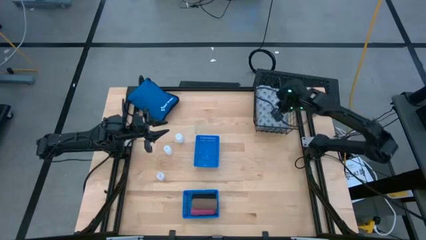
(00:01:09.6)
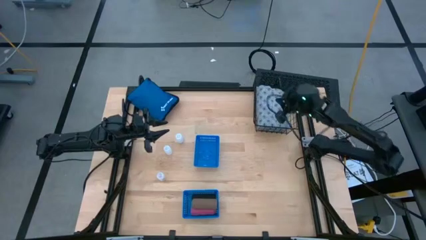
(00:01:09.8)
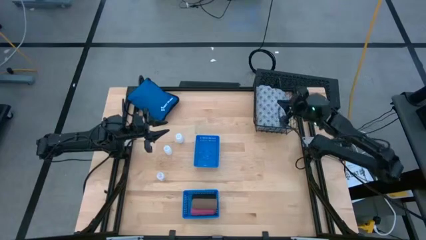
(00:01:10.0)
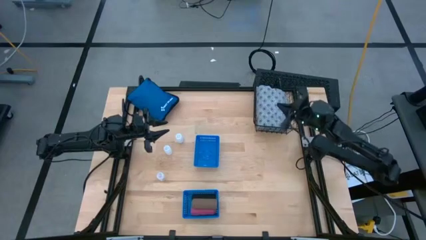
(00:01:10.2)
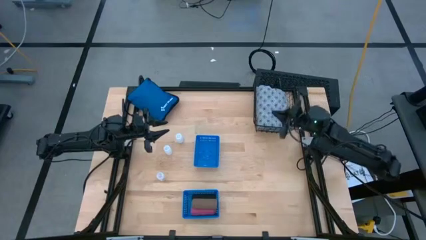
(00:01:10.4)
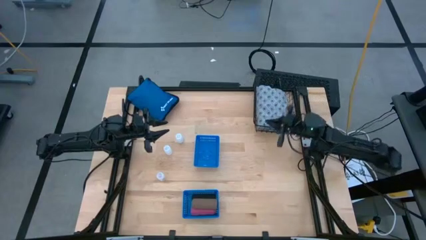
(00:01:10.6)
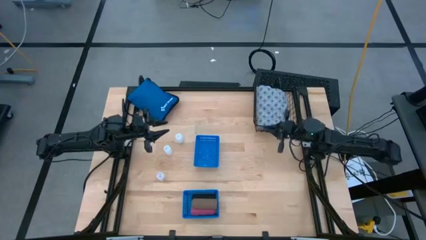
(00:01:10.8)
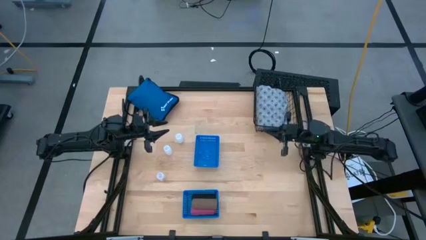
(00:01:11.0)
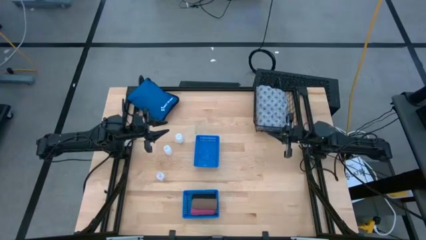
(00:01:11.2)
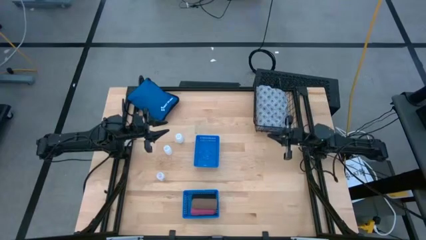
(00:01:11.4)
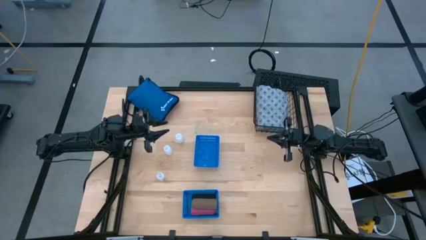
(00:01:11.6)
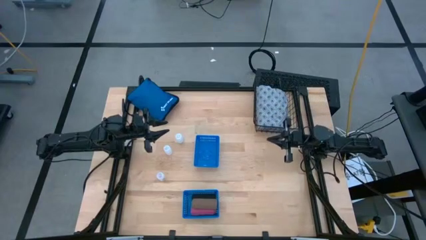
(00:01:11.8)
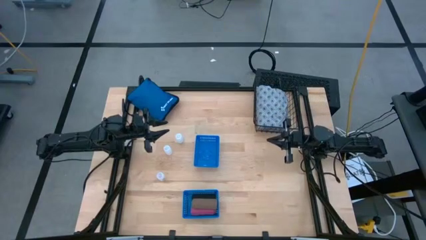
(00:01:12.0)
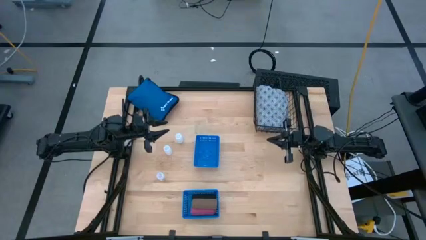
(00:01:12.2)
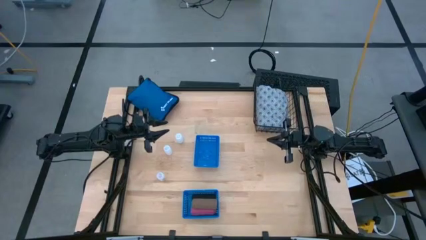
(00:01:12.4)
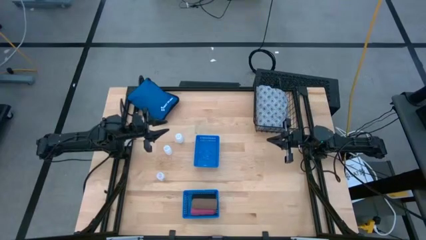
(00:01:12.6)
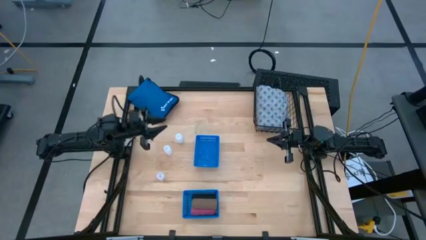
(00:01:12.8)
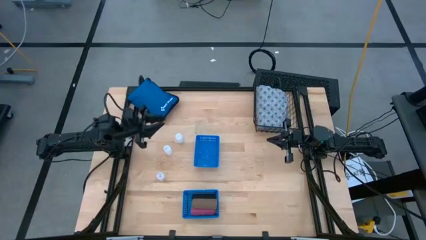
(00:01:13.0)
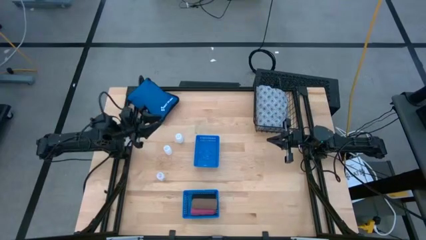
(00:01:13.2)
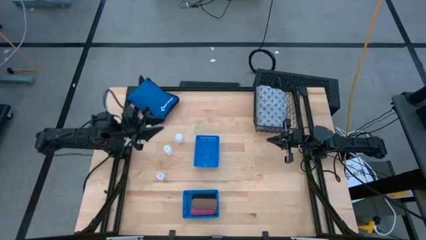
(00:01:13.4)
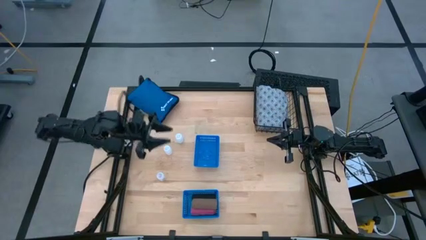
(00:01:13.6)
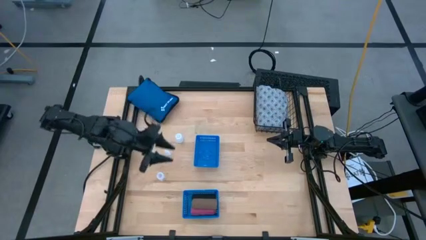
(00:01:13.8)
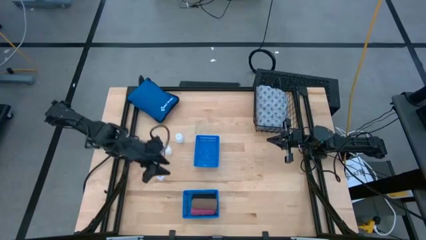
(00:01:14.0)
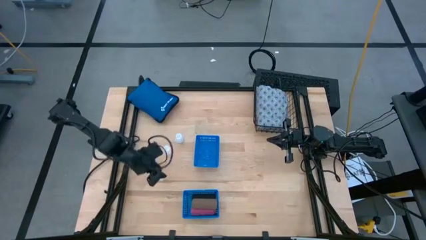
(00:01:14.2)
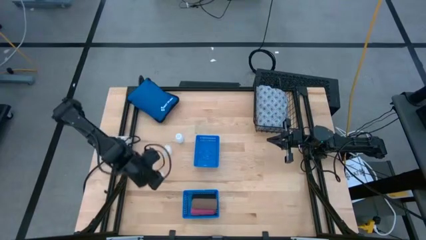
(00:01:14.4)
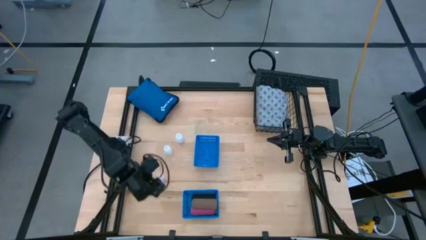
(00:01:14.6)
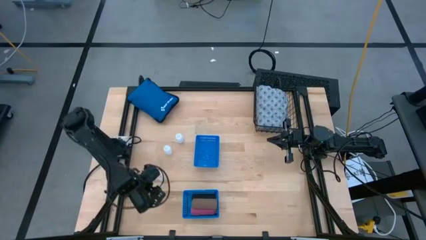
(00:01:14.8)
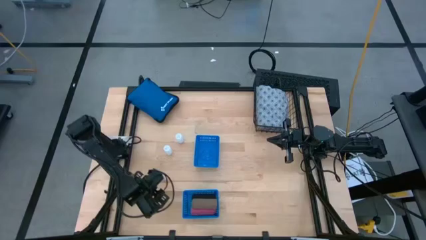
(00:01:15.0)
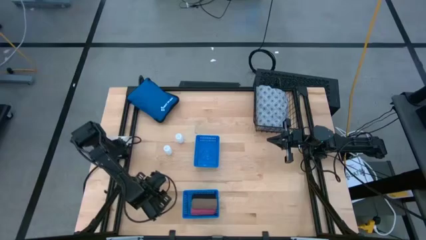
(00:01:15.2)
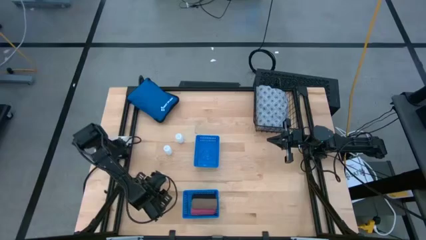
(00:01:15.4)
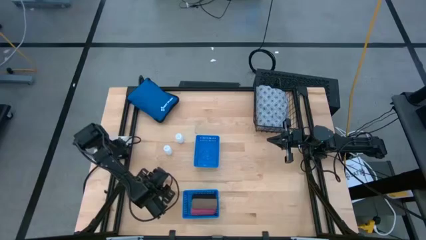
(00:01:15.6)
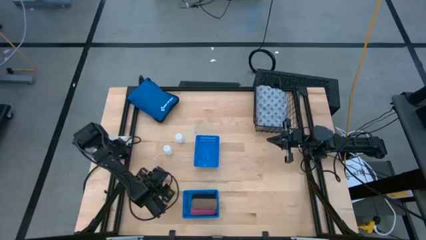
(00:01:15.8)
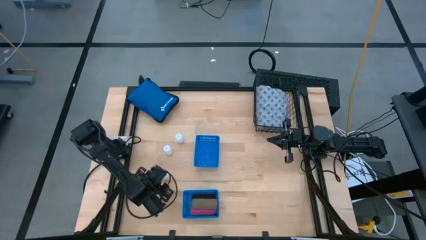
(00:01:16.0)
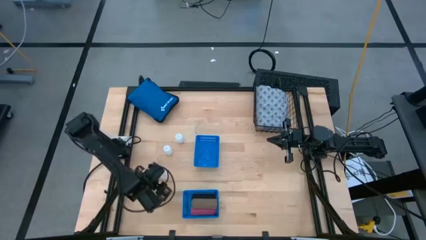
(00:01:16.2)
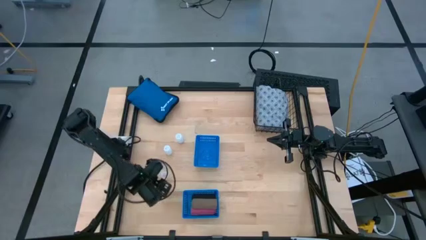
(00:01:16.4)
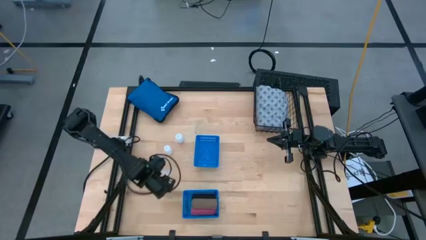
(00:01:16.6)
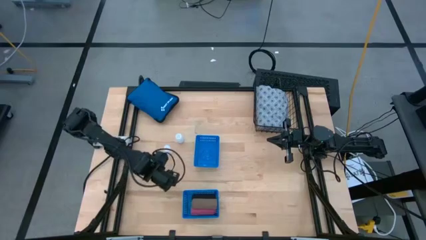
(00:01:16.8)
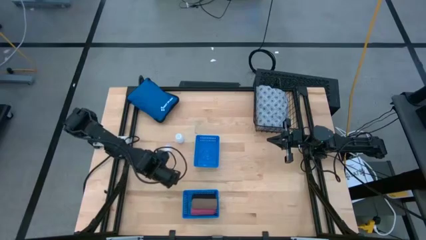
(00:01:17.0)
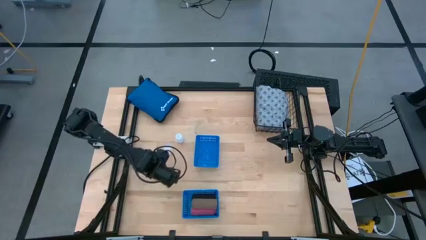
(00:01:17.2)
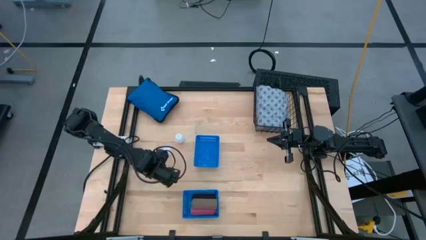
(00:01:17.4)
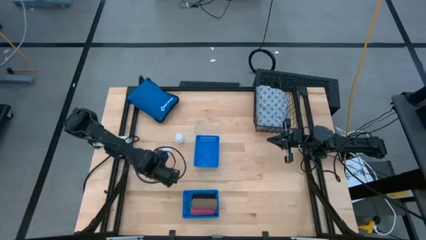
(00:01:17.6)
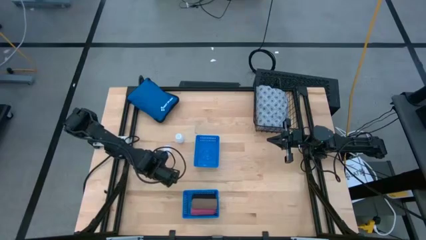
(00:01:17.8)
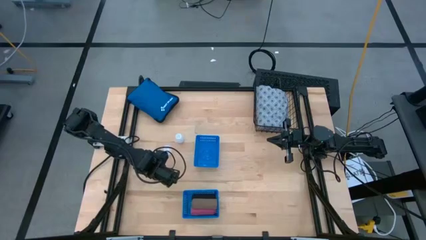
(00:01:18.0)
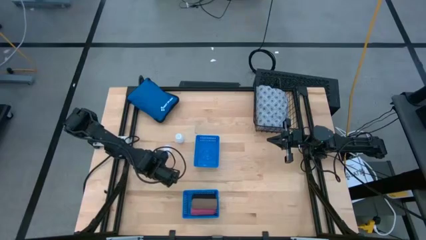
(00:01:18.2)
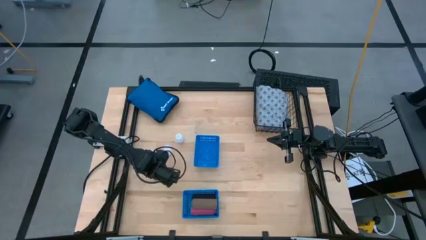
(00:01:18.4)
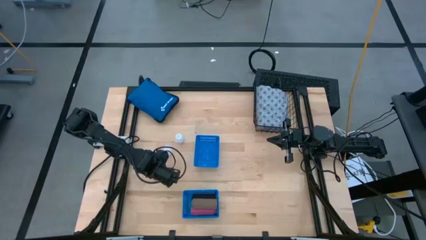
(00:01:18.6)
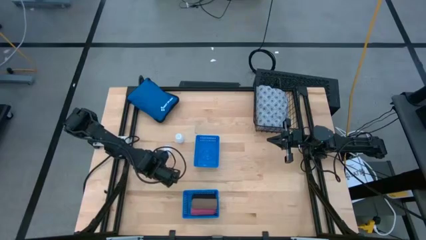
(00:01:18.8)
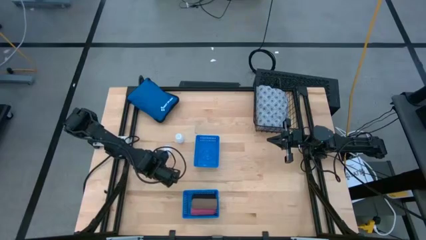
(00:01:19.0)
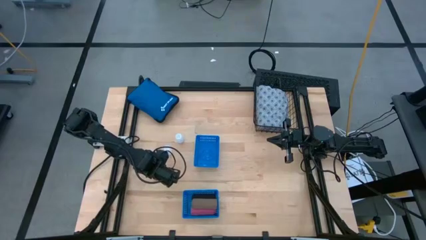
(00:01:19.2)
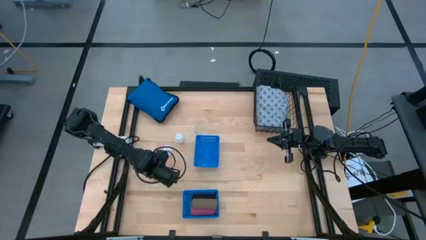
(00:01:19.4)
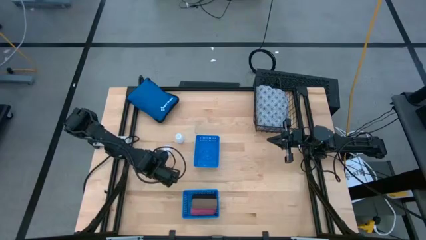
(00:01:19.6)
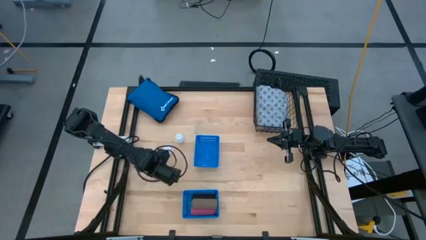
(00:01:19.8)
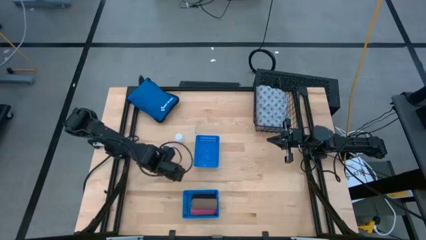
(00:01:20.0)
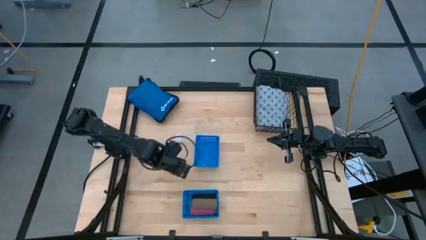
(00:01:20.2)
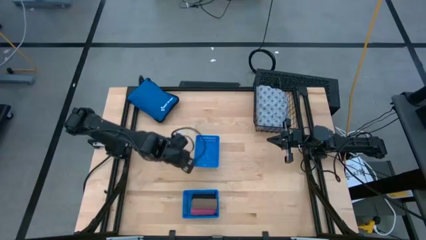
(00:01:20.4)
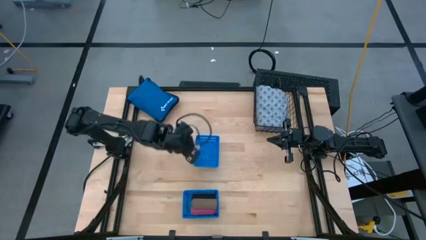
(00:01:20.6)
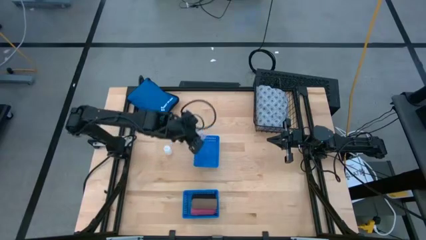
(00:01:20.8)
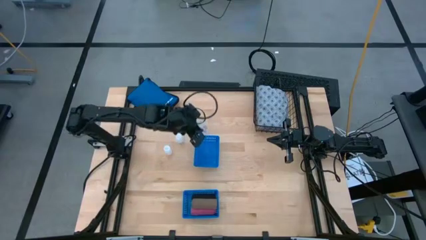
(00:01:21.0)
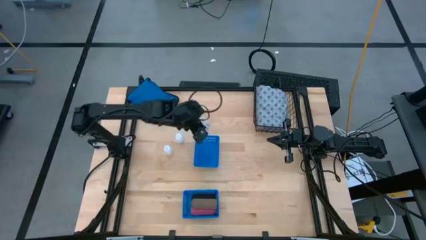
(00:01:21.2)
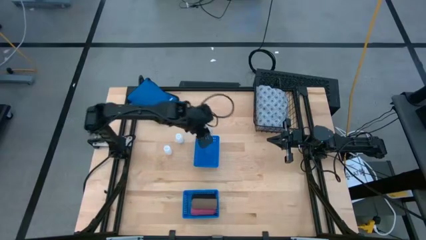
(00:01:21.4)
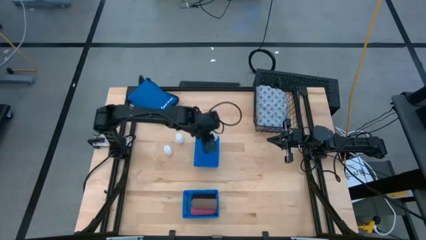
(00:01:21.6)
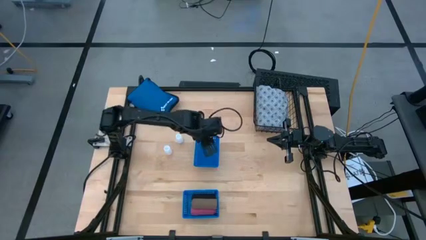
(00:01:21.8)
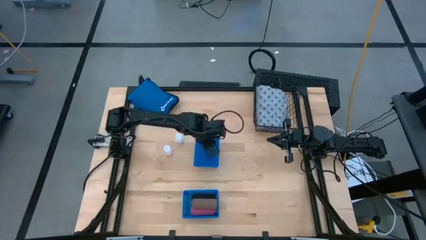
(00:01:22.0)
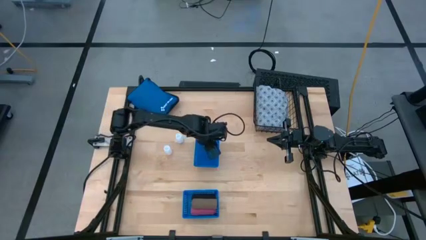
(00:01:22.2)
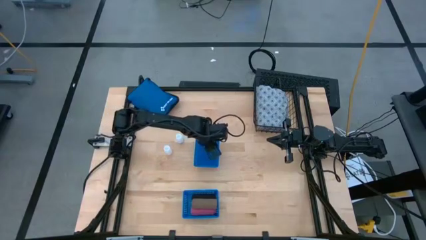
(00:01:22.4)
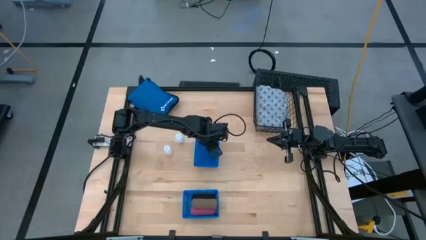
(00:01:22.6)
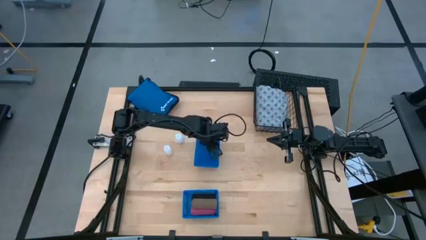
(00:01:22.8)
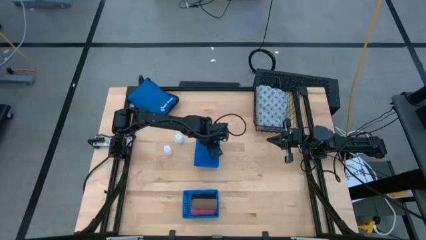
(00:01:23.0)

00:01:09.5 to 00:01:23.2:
Task: Pick & place medical supplies in basket/bin
Put the bottom white pill bottle into the top blue bin

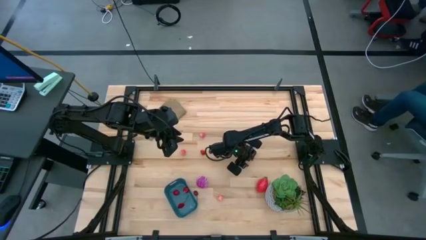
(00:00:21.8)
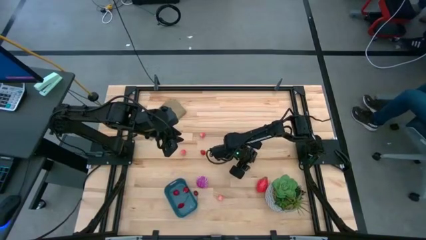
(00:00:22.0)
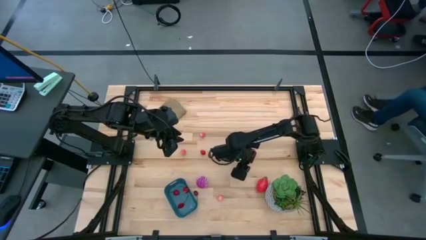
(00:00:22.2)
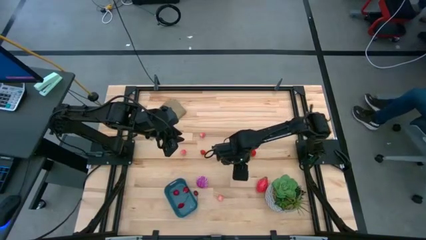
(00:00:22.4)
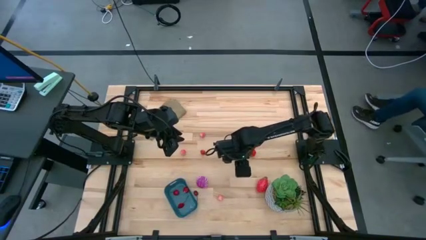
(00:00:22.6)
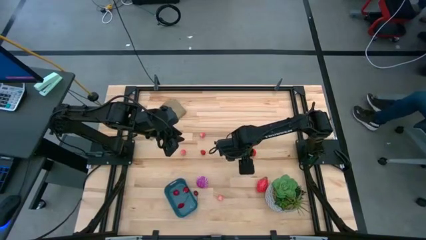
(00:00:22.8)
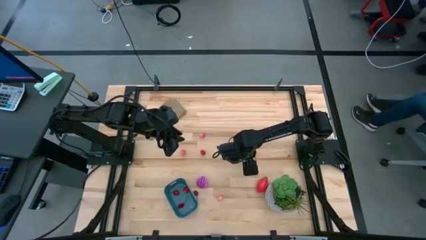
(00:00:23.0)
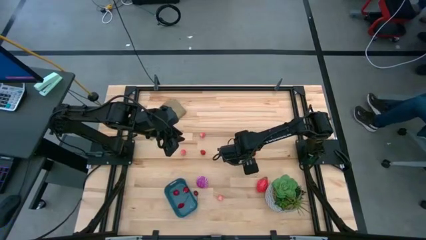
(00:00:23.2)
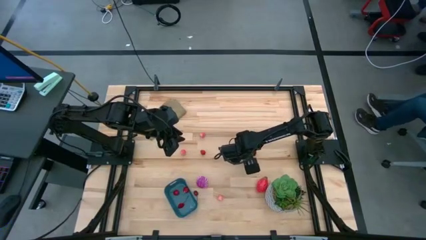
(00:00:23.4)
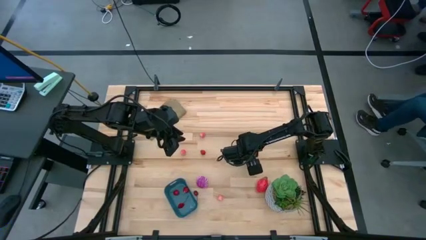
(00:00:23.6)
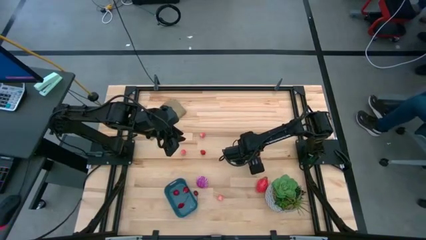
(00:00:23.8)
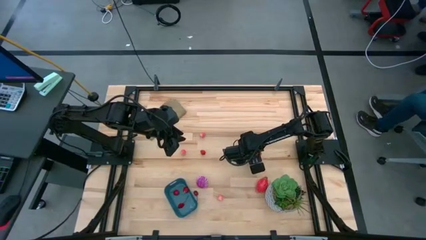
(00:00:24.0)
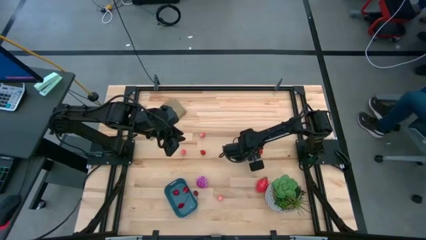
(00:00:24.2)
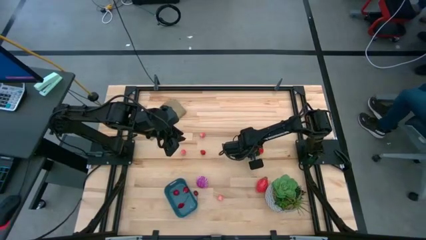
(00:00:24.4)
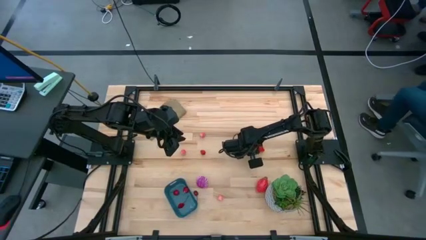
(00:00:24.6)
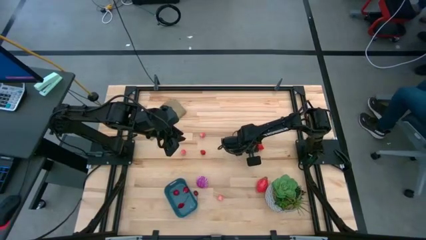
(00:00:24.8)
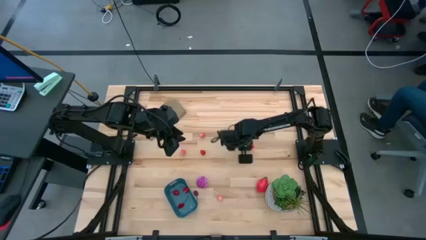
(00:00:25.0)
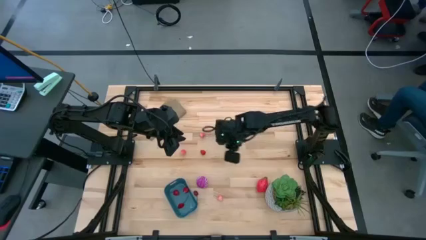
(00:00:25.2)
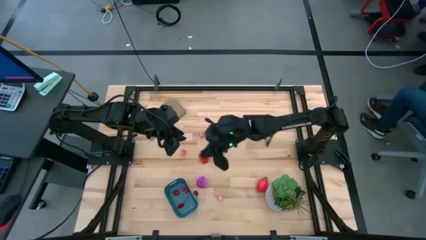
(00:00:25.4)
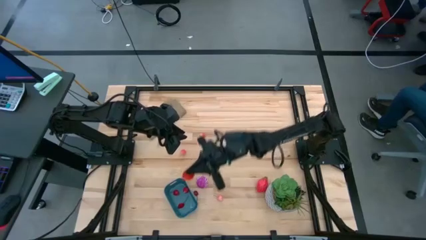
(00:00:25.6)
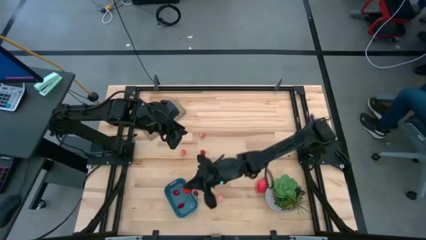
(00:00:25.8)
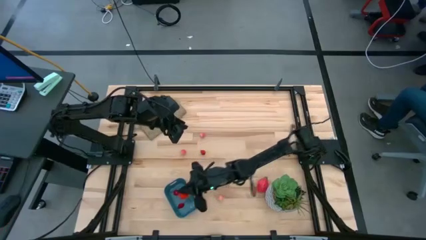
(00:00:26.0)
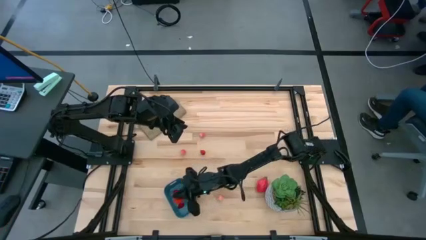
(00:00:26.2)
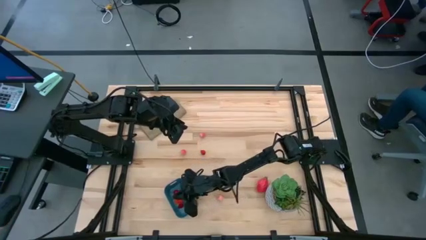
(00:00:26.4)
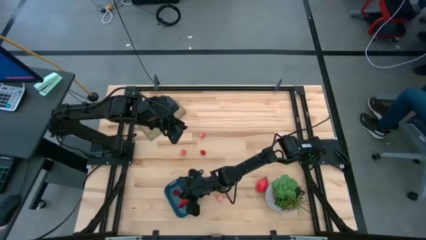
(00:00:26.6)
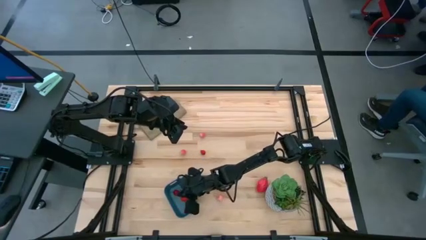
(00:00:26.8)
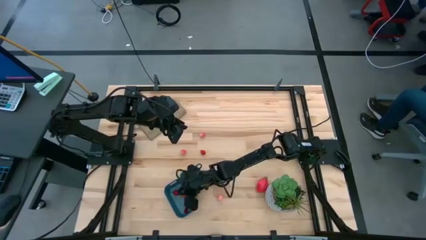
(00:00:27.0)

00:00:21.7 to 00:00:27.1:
Task: Pick and placing Produce into tupperware
Put the red strawberry into the blue bin
